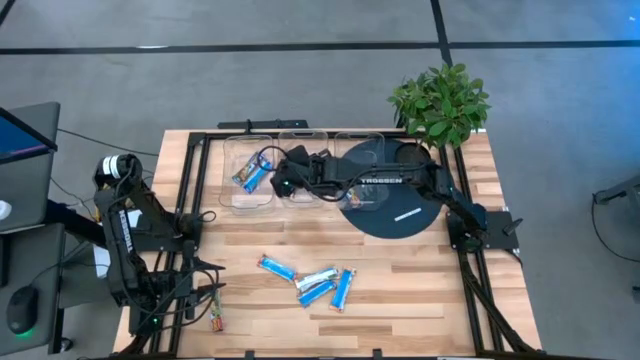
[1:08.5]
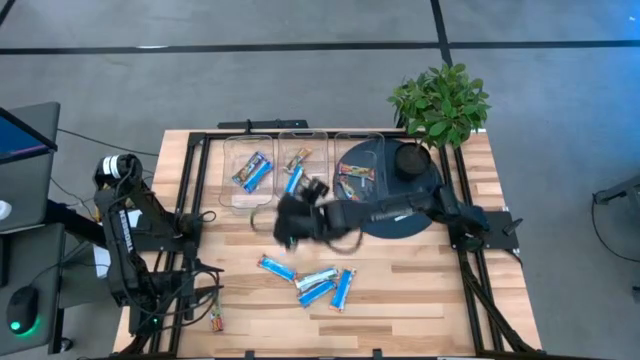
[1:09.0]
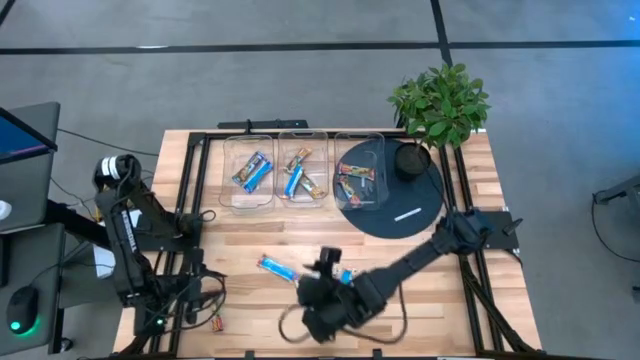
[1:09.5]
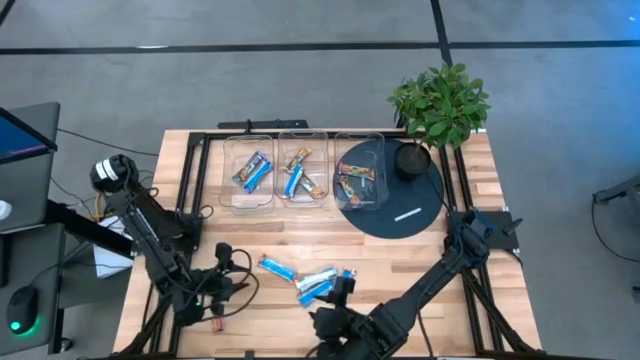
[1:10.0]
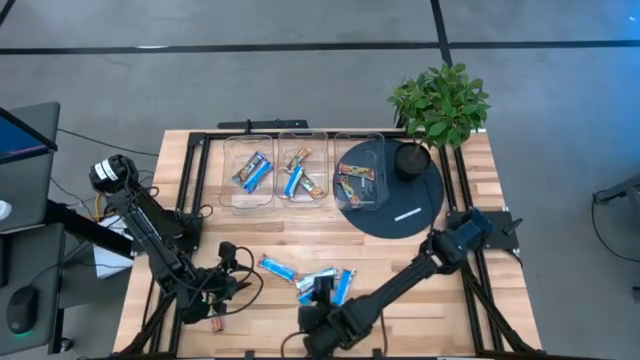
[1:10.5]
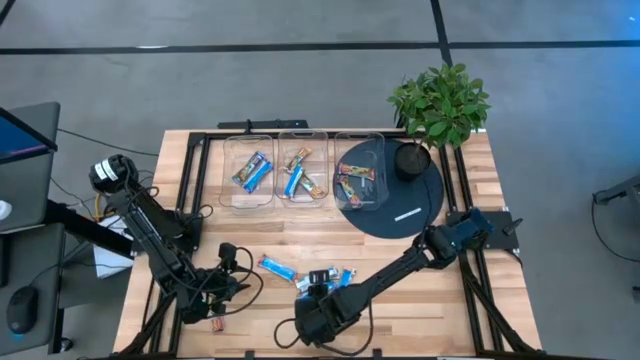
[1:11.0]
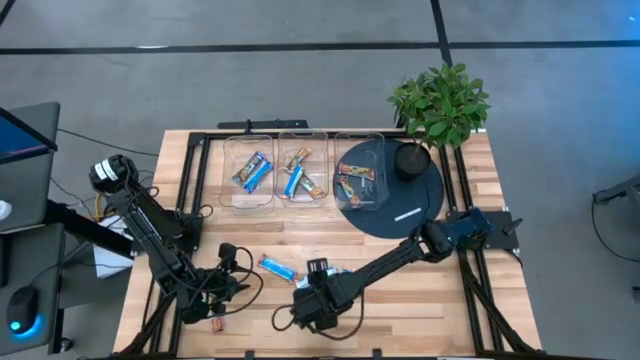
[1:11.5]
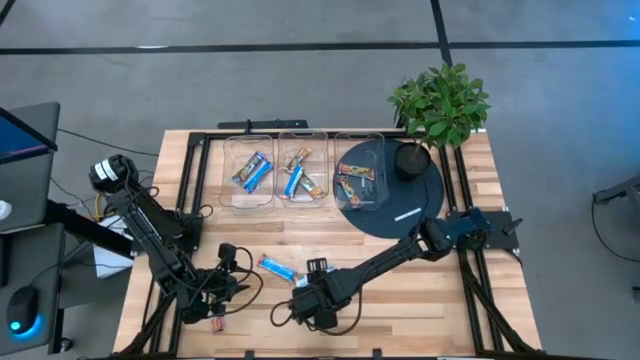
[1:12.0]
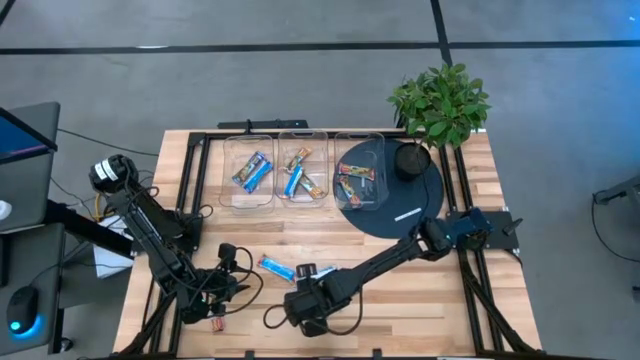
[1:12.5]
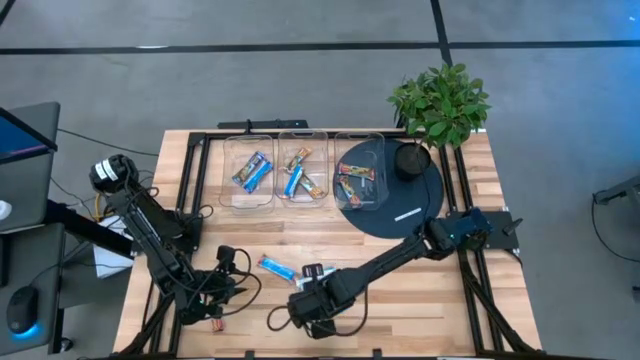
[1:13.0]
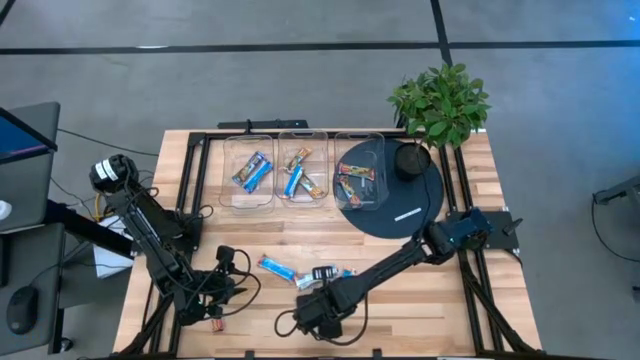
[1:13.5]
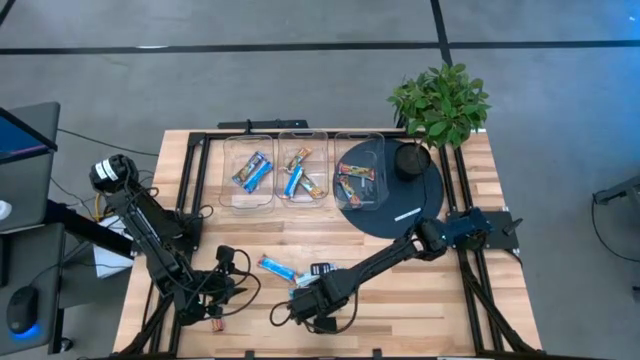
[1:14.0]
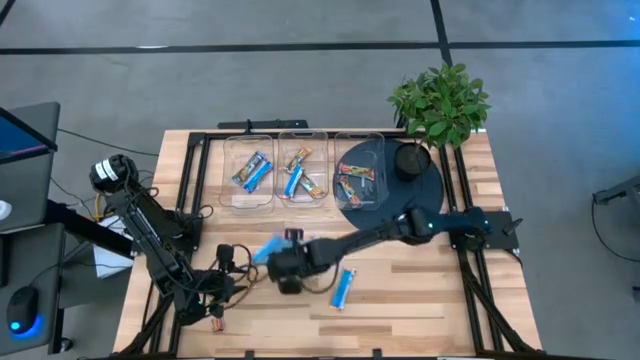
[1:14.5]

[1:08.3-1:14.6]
Task: Pick and place Granola Bars by type
Move the granola bars to the middle left of the table

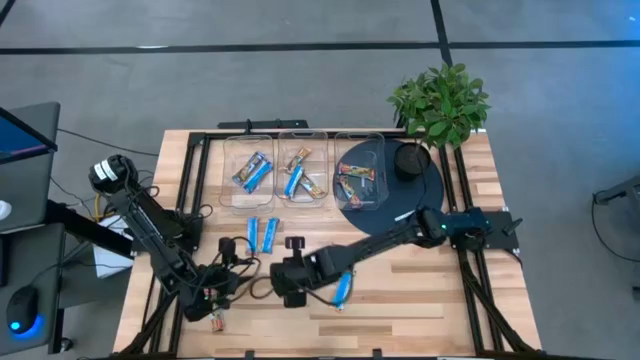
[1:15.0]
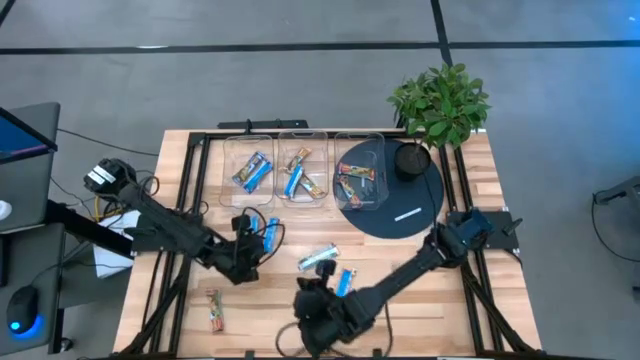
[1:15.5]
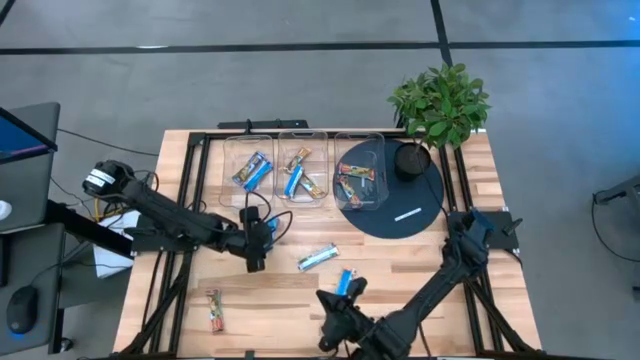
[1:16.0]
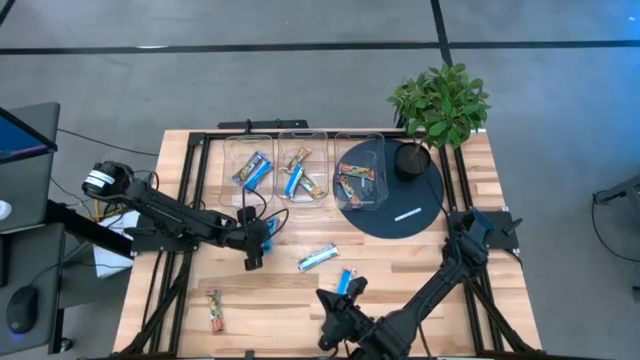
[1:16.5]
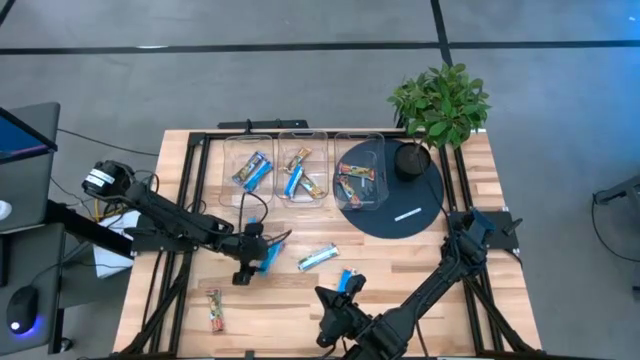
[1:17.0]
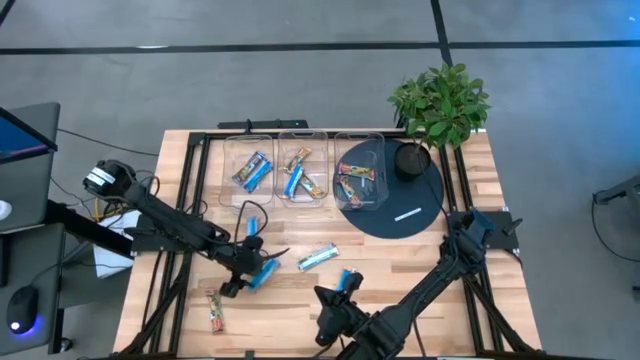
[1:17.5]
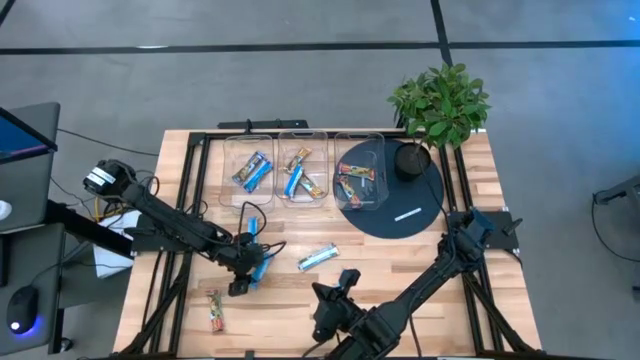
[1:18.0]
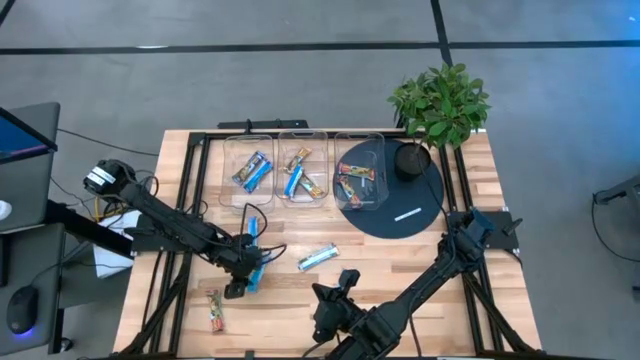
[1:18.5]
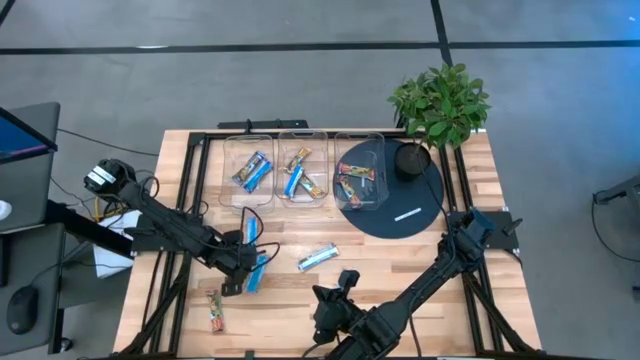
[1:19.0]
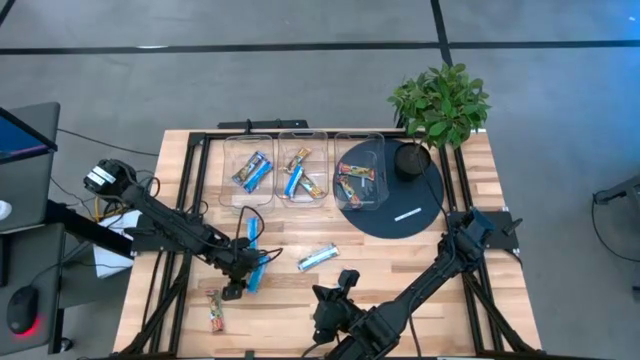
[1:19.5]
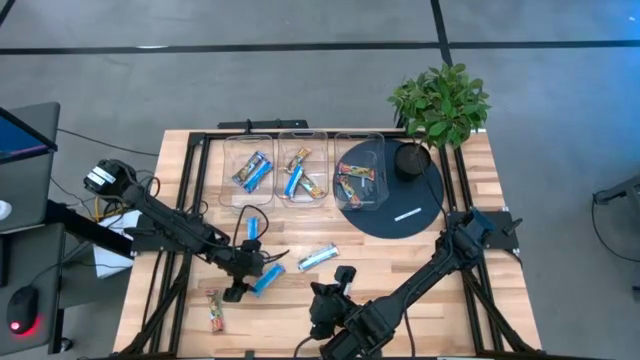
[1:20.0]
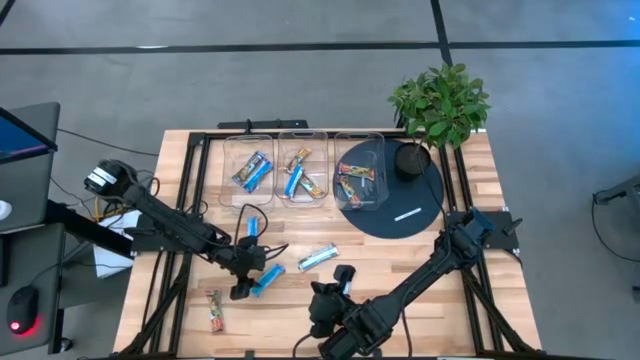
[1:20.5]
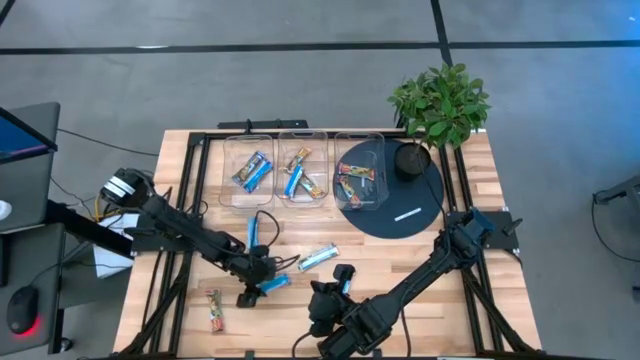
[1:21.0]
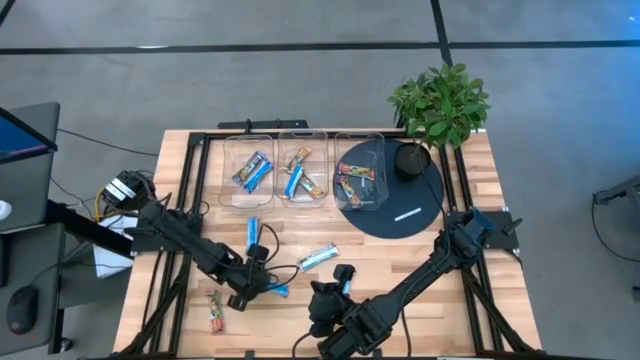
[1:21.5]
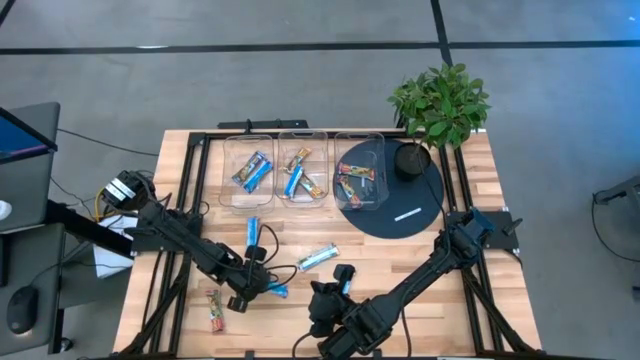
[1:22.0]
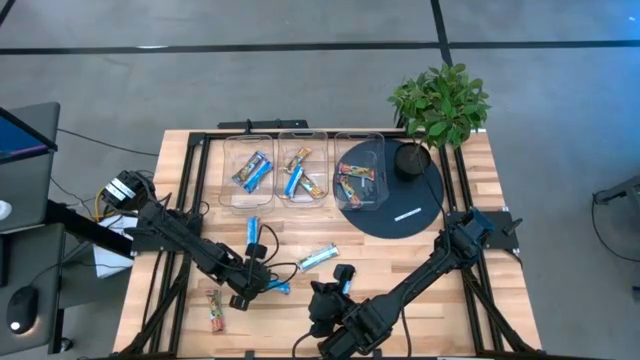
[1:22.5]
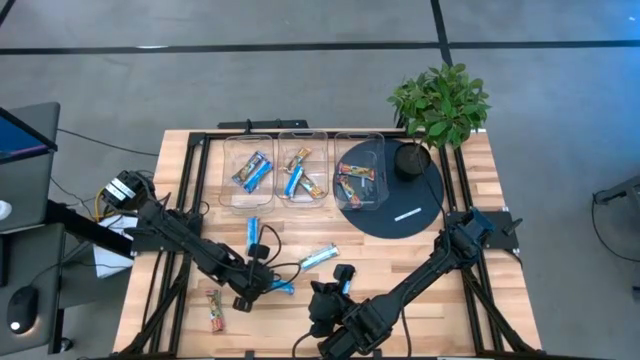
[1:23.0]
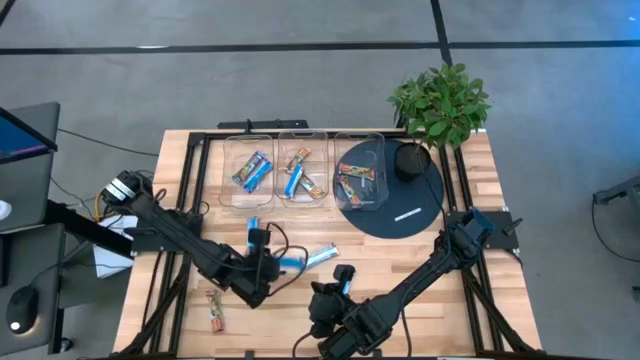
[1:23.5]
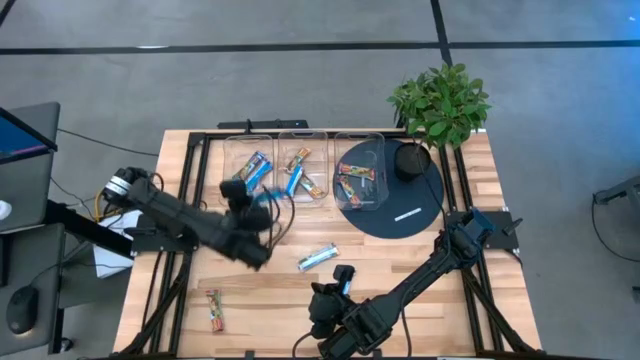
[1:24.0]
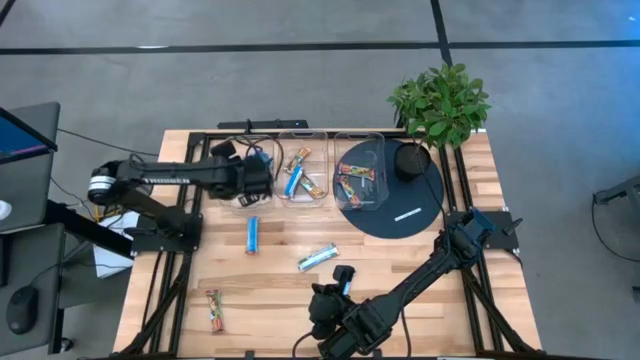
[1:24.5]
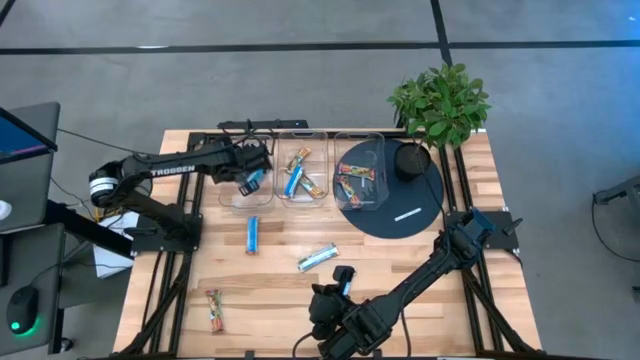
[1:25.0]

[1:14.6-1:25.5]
Put the blue granola bar into the left transparent bin

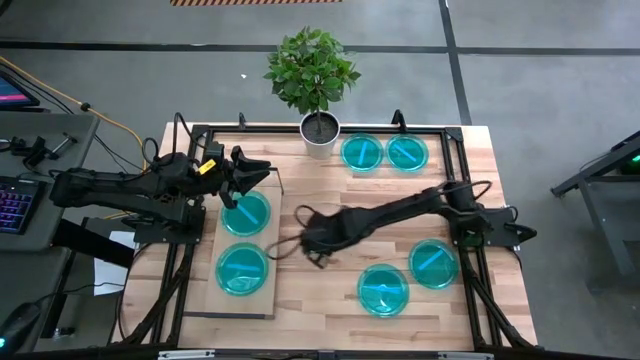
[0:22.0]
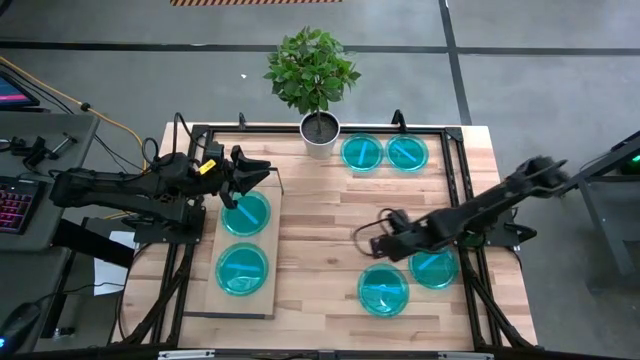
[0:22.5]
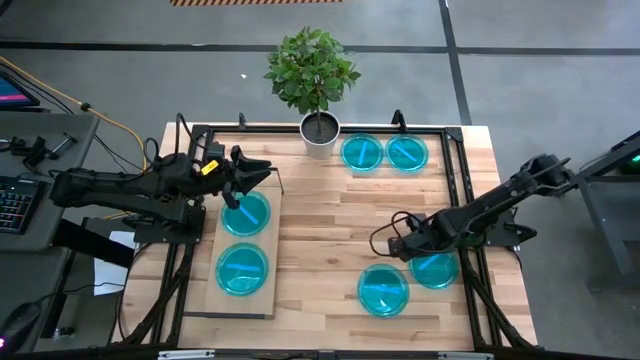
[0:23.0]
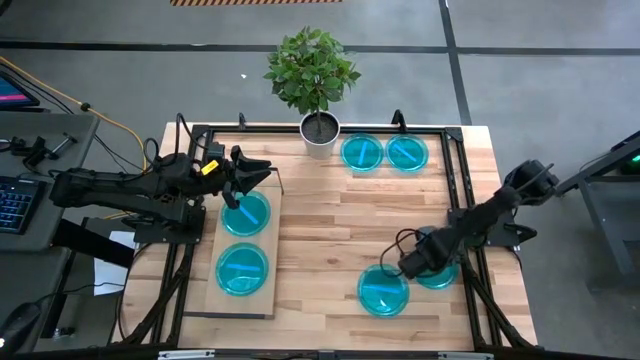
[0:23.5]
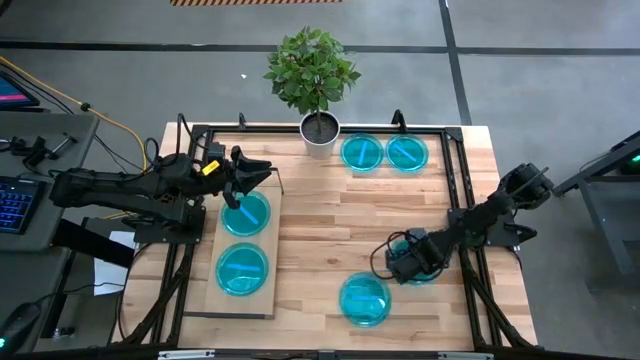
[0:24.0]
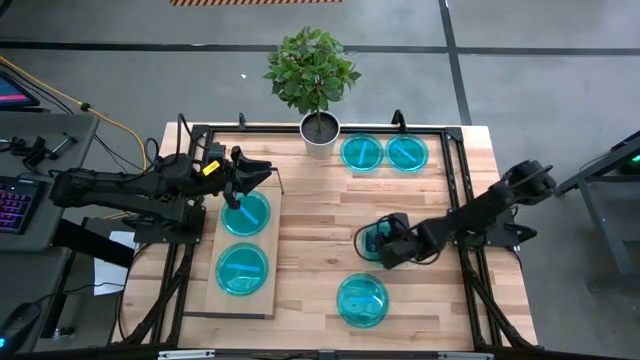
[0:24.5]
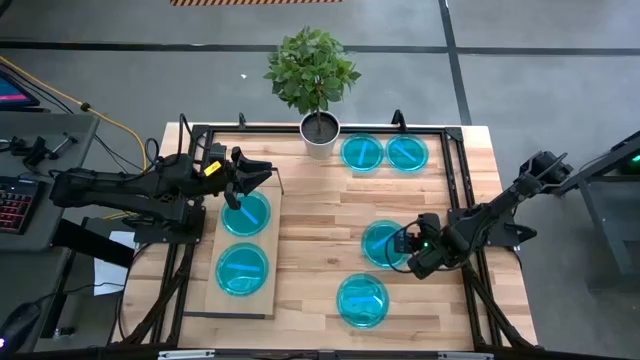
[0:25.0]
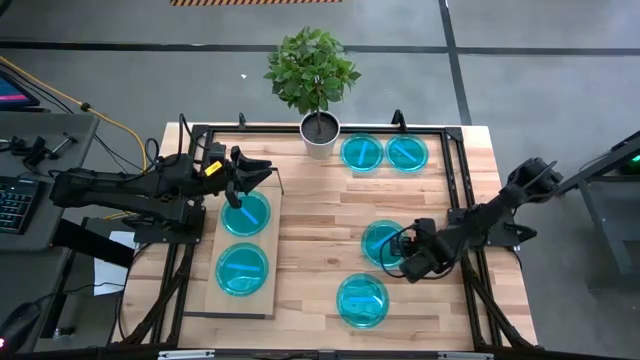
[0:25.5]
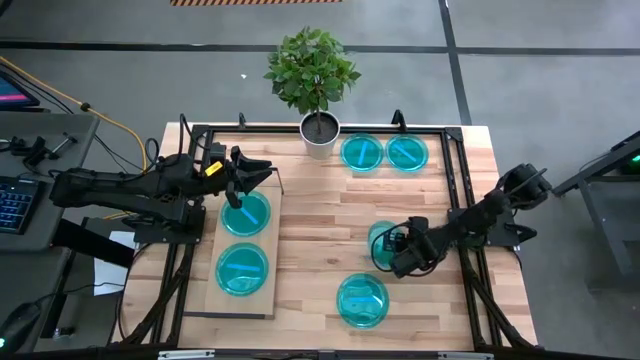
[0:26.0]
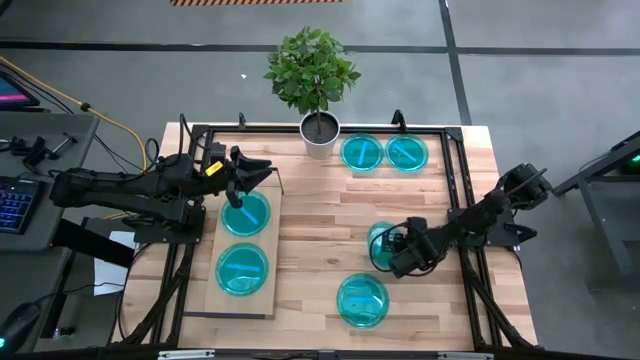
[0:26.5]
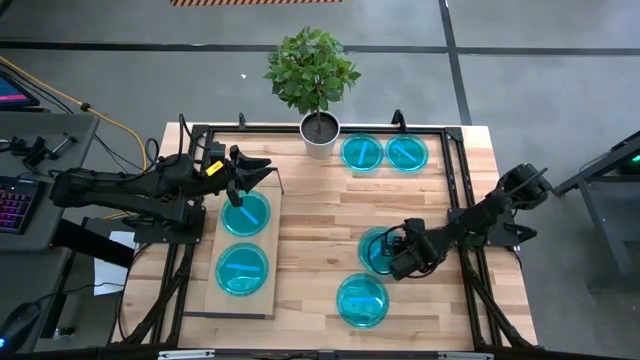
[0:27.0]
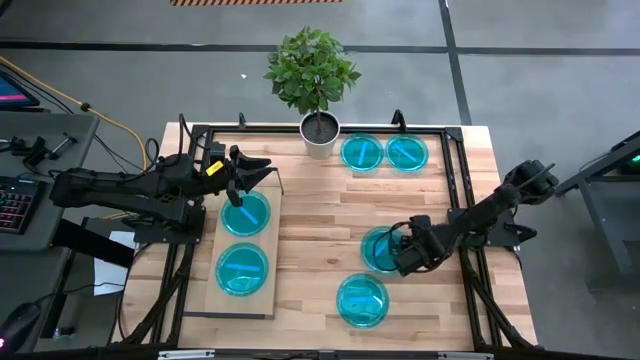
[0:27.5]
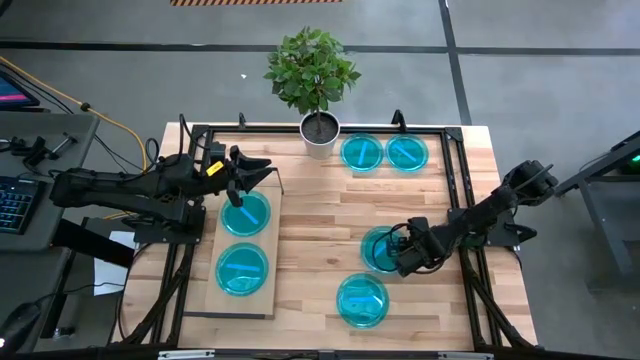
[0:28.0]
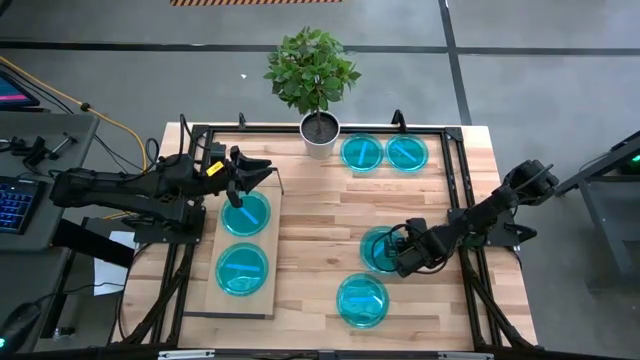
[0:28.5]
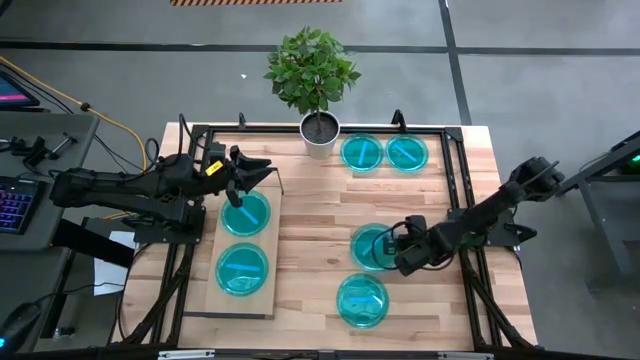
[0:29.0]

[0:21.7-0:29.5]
Task: Place and stack plates onto a shelf
Stack the bottom right blue plate on the top blue plate on the shelf
